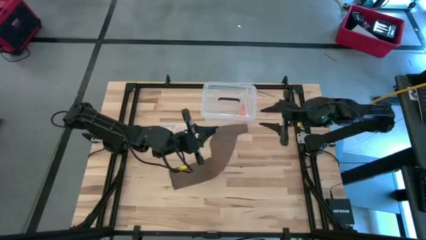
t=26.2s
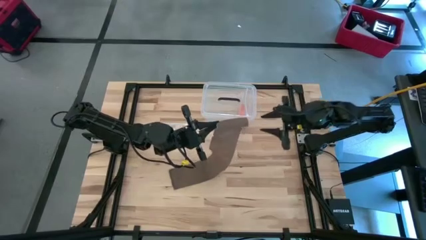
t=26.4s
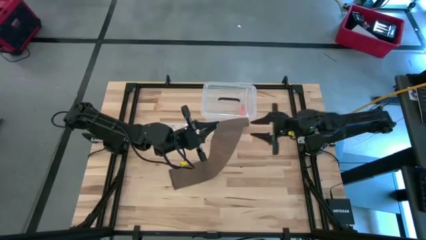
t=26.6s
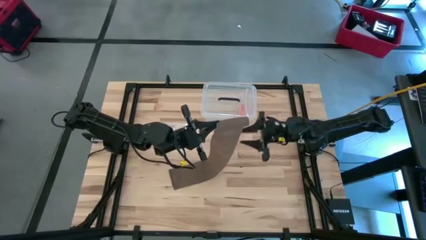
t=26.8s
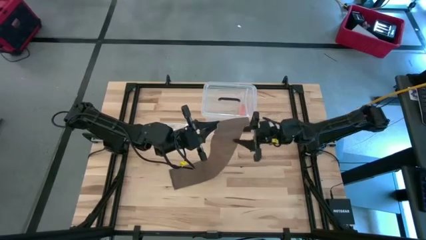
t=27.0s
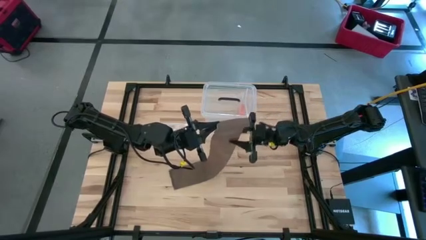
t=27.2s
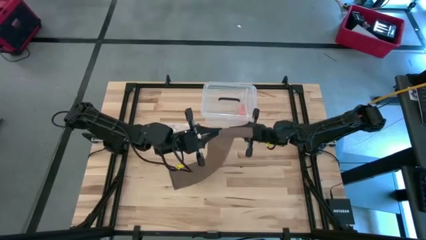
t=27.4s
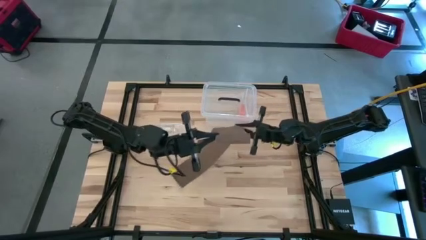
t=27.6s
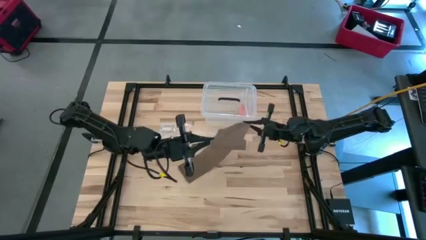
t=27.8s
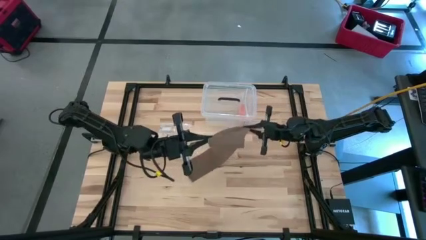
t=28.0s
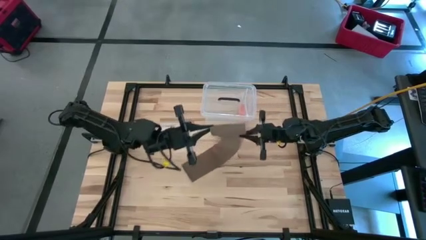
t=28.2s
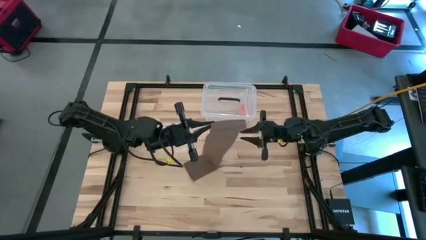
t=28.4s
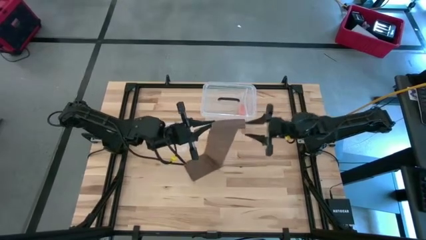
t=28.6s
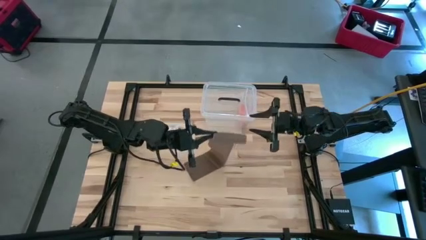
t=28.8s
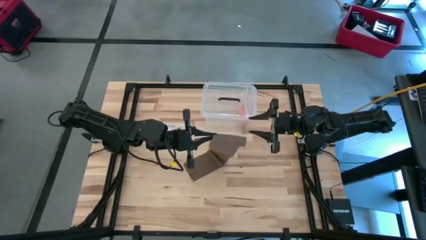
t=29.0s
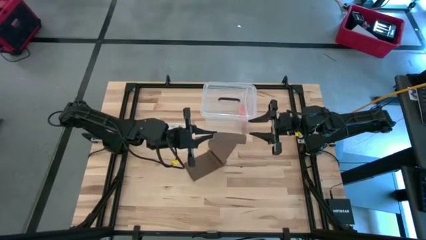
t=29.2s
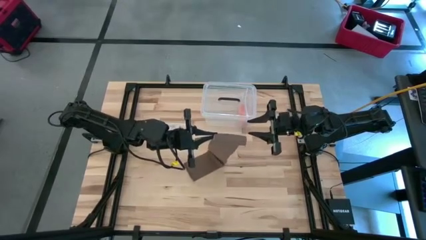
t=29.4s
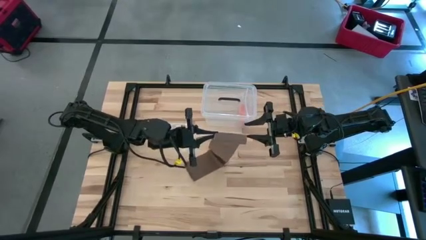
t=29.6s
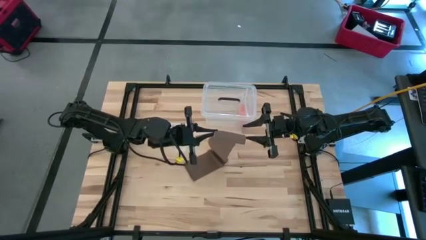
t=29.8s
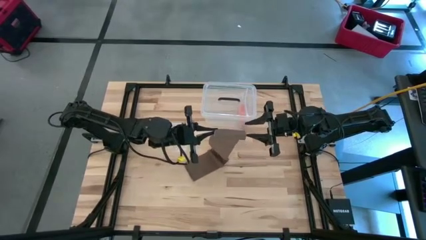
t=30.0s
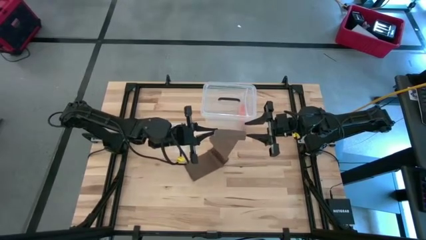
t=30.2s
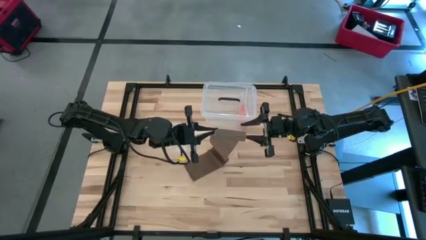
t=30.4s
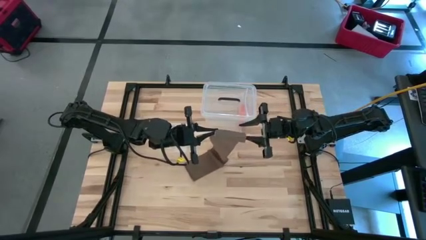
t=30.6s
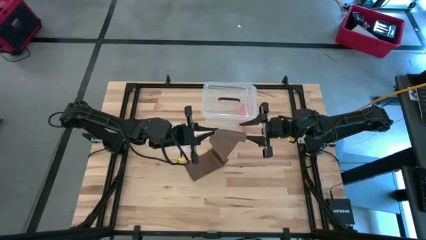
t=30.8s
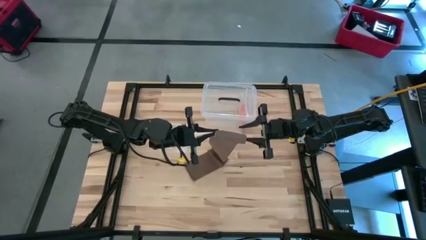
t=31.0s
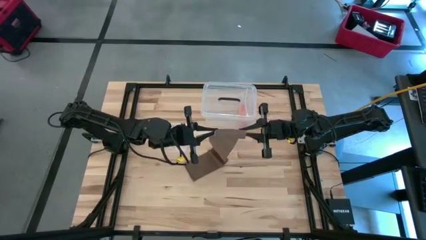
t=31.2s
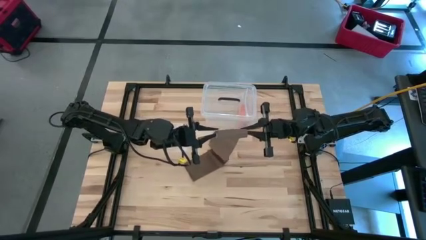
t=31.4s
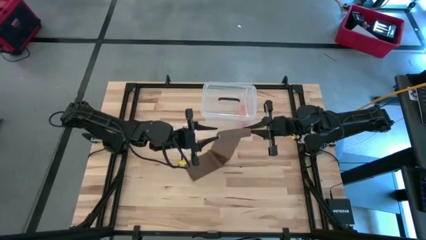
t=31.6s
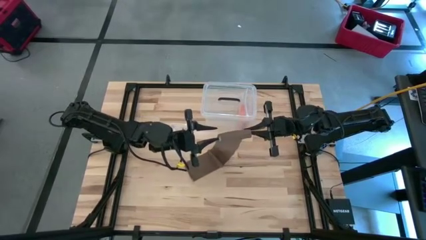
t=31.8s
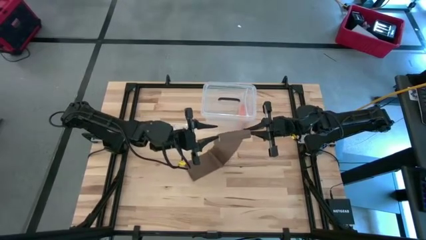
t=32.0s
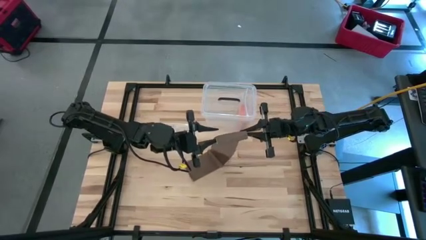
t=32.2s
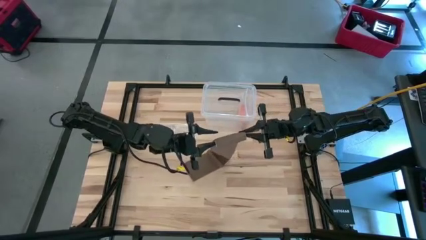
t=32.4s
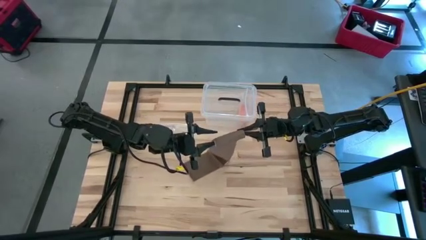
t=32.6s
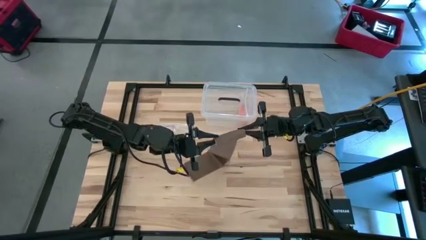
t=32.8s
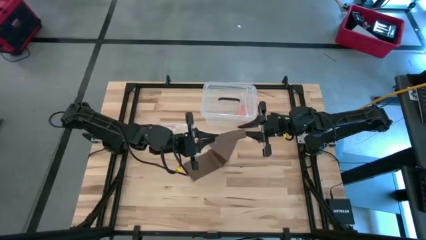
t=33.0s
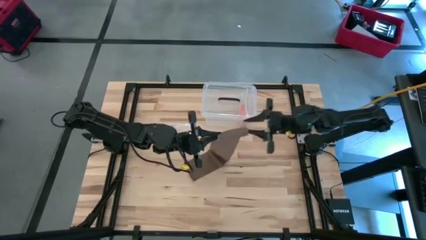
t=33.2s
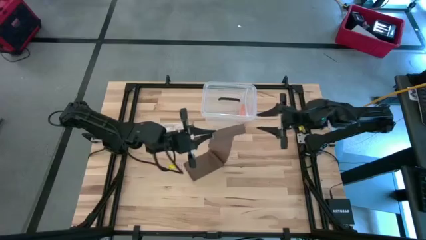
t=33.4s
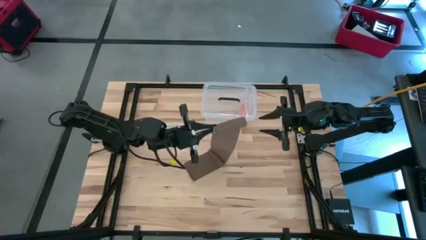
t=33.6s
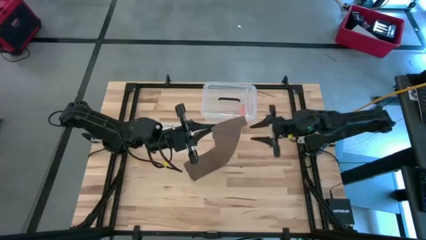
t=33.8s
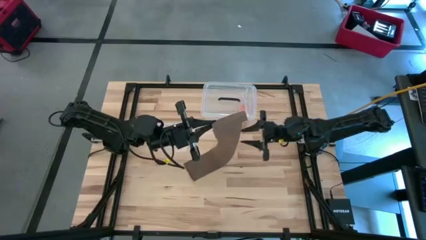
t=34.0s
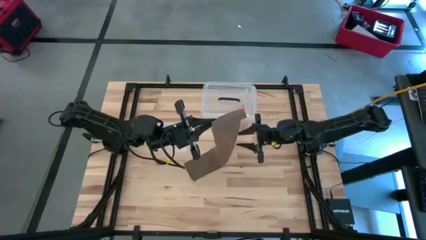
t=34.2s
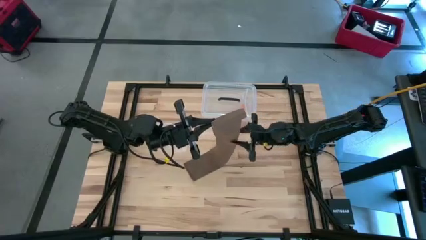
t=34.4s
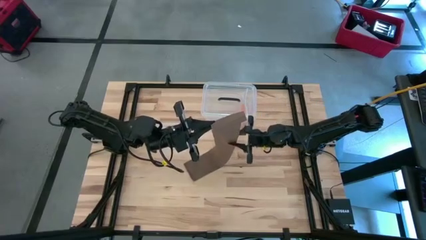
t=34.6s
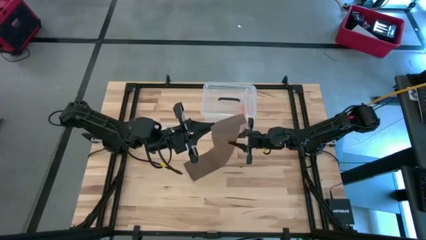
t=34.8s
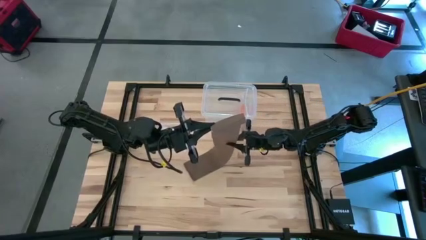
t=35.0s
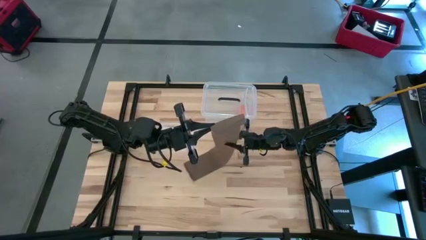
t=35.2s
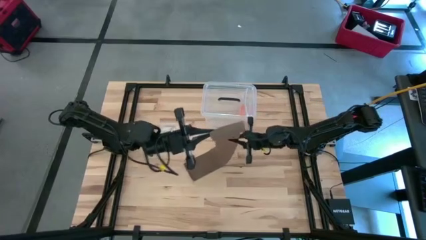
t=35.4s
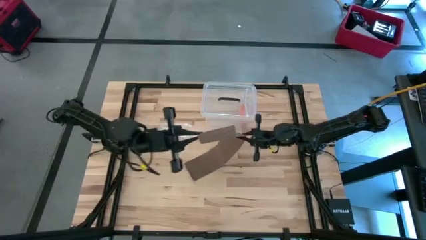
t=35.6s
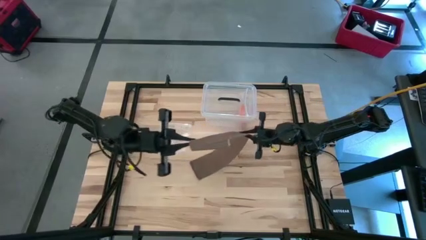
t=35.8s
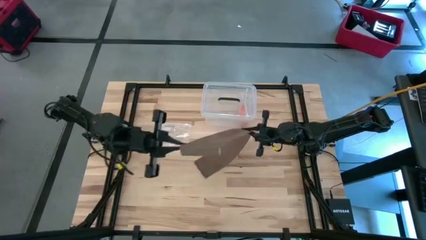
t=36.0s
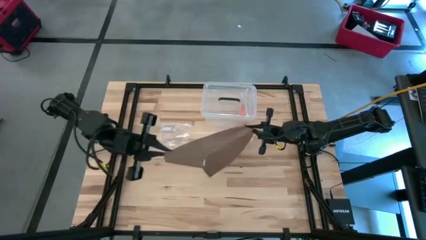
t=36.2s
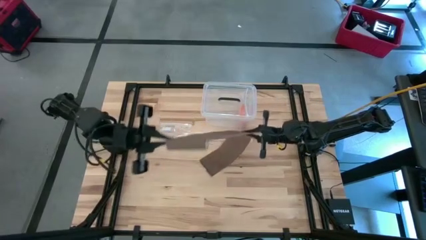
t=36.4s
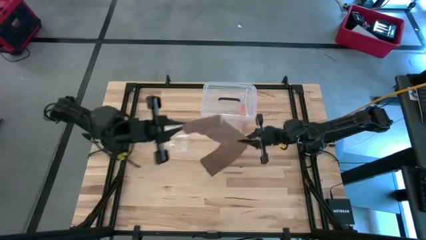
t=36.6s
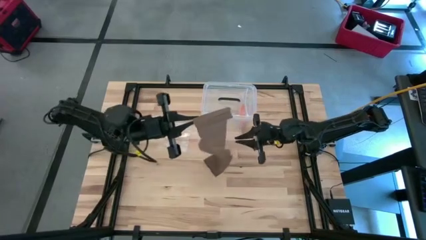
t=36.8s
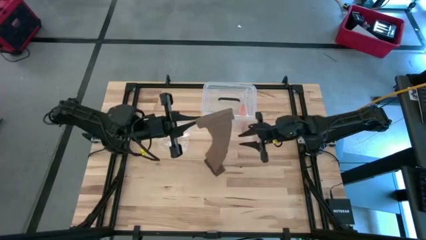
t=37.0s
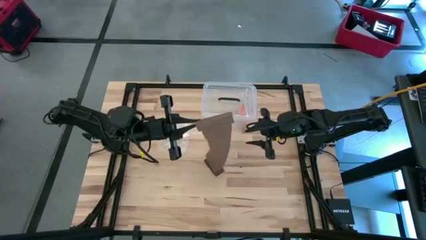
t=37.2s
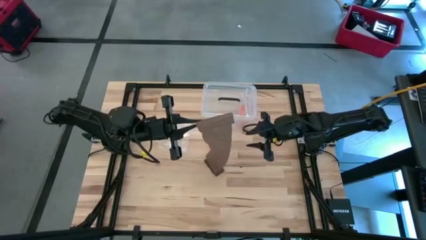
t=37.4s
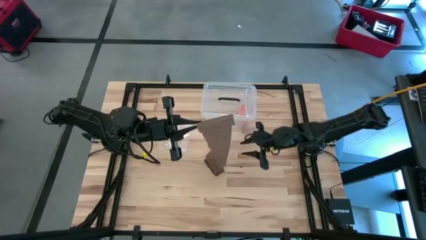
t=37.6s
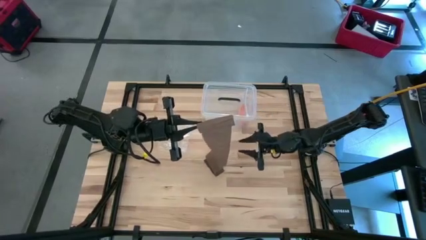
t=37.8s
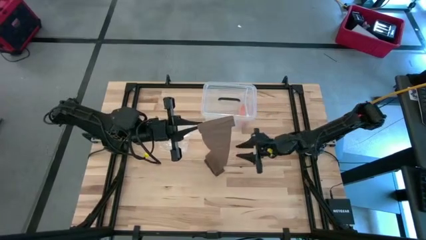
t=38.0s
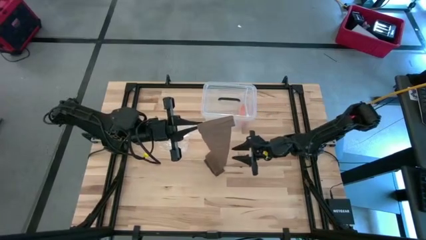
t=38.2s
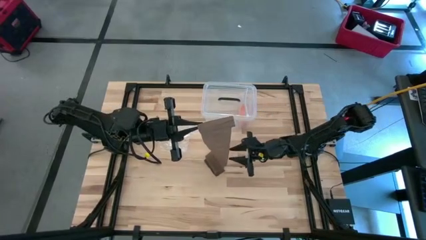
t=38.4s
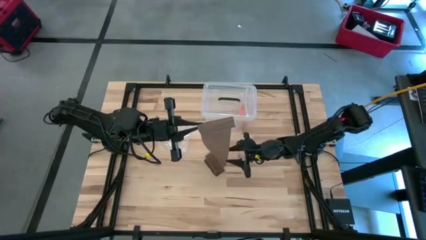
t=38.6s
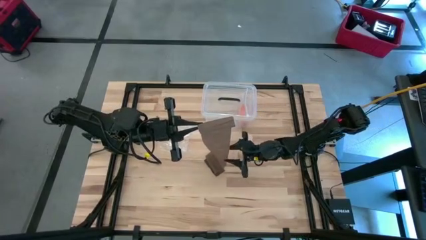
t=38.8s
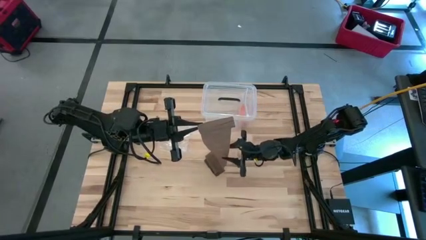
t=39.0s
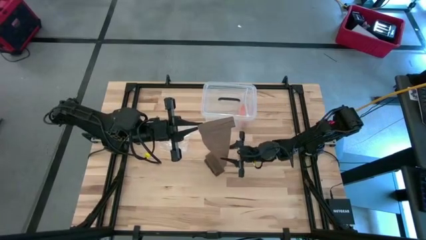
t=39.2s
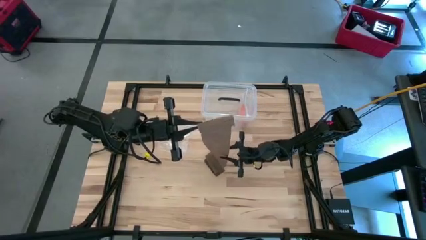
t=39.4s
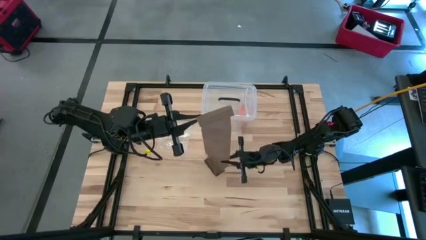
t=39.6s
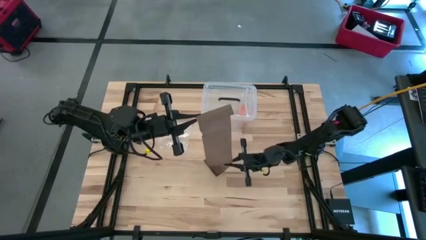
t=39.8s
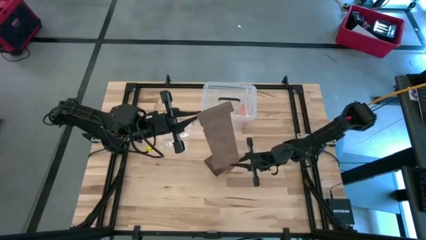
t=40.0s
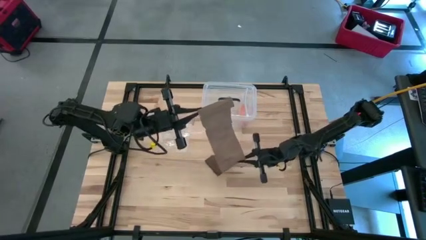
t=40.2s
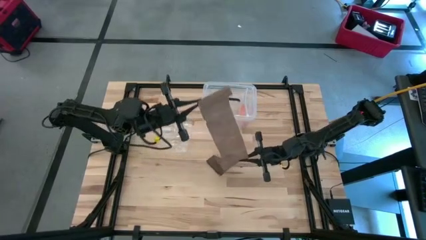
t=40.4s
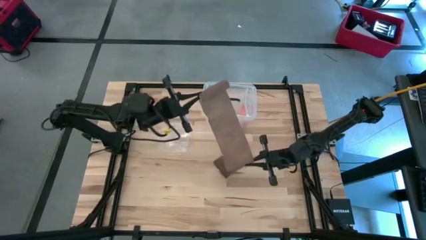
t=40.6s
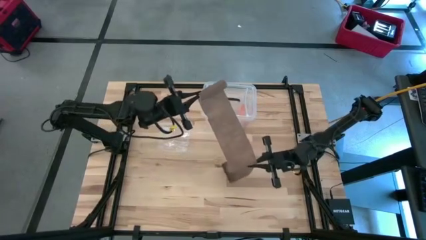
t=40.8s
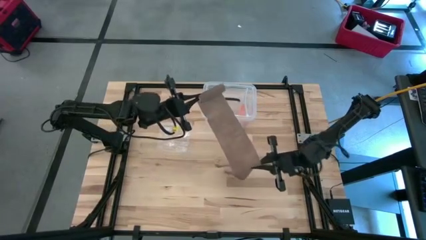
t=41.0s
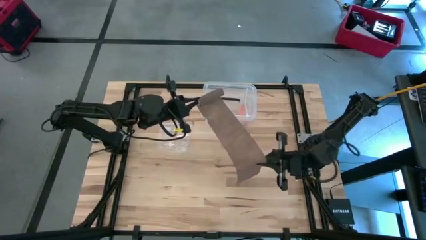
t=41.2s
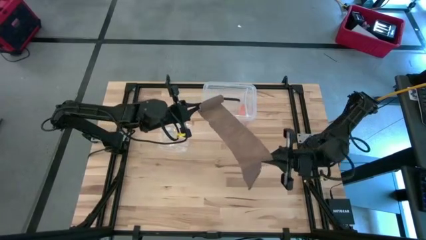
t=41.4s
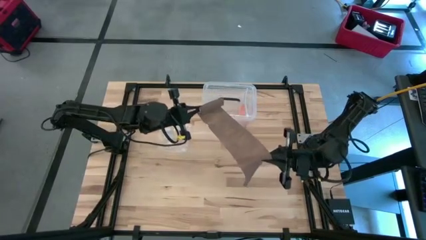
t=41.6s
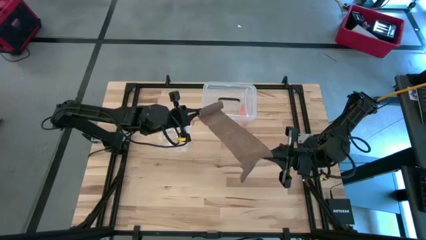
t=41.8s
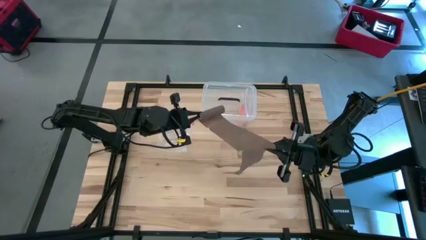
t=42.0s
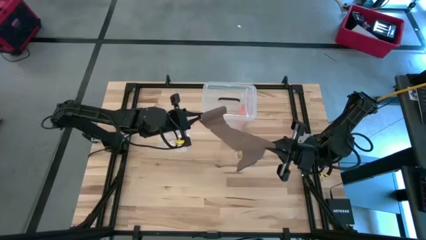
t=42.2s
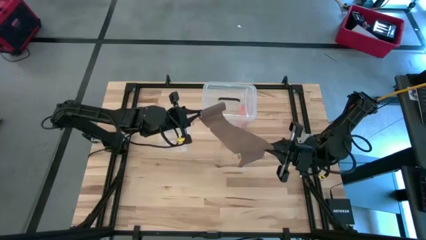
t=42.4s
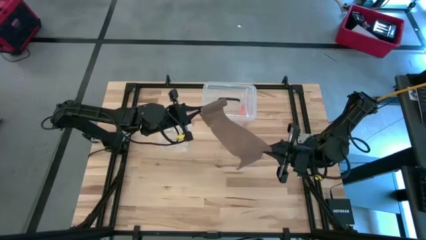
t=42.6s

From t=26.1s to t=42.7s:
Task: Roll bandage
Roll the brown bandage
